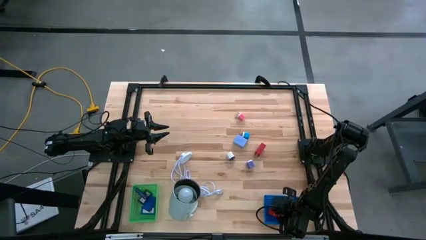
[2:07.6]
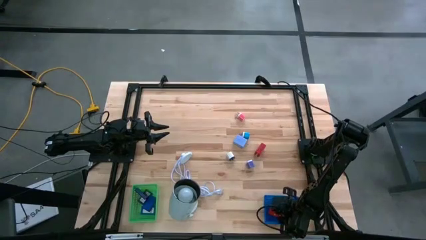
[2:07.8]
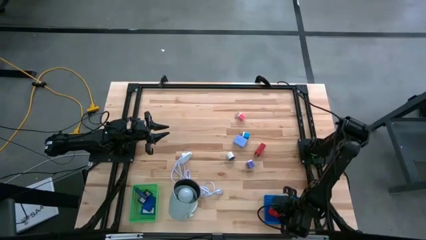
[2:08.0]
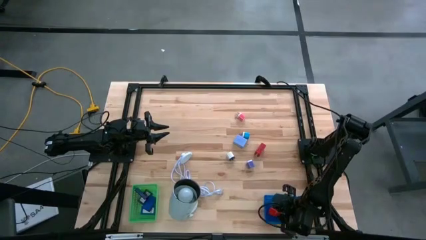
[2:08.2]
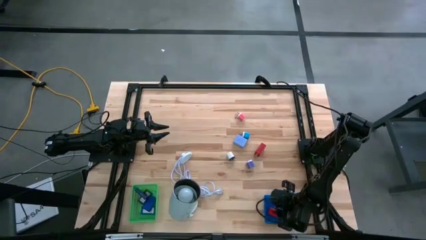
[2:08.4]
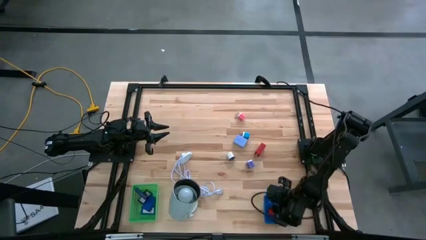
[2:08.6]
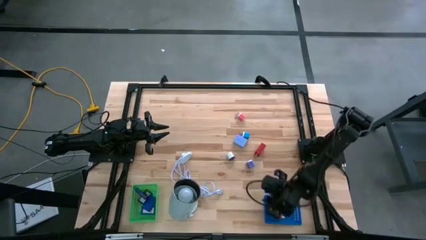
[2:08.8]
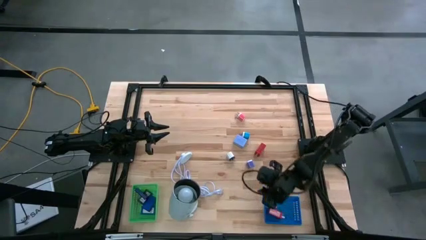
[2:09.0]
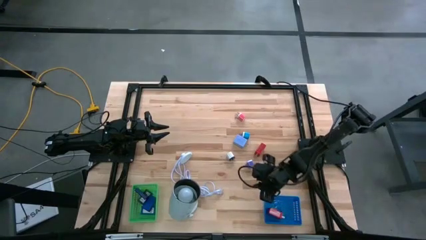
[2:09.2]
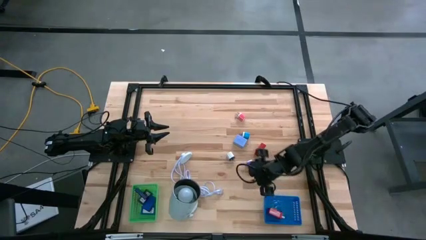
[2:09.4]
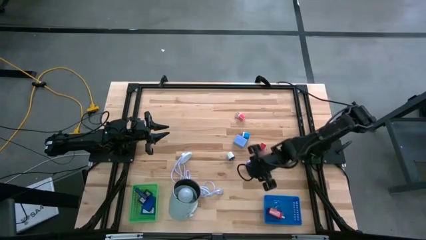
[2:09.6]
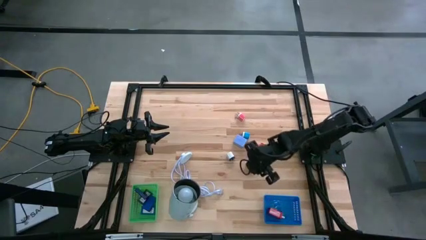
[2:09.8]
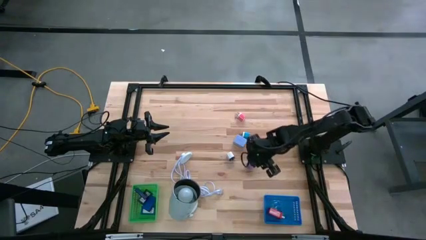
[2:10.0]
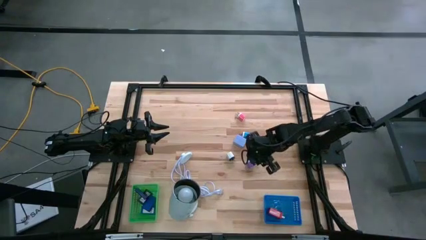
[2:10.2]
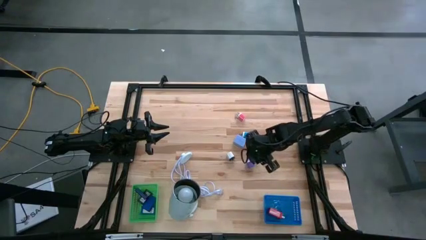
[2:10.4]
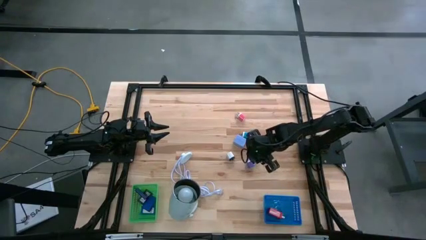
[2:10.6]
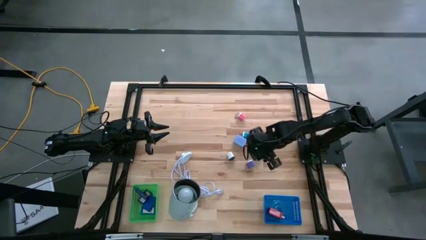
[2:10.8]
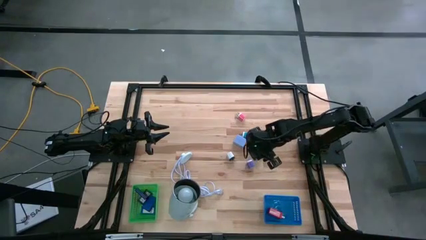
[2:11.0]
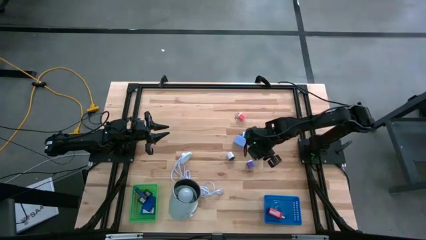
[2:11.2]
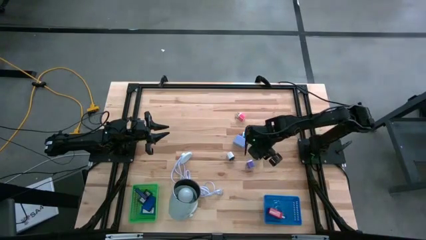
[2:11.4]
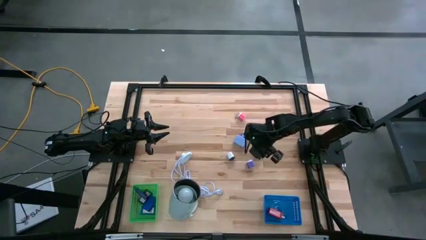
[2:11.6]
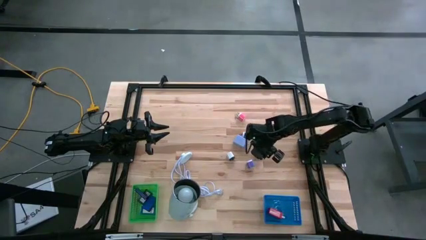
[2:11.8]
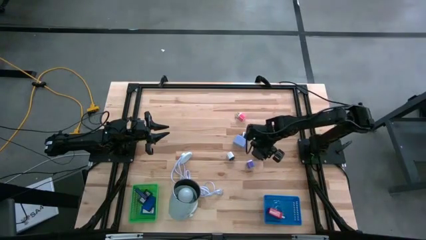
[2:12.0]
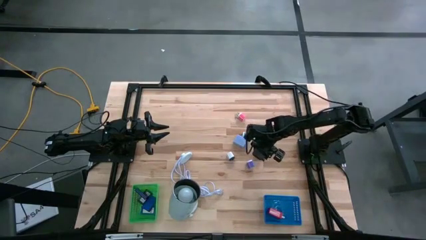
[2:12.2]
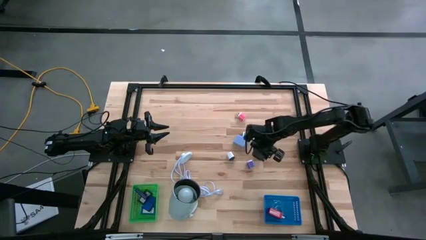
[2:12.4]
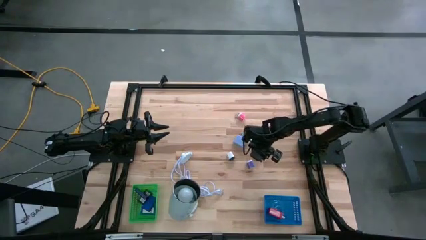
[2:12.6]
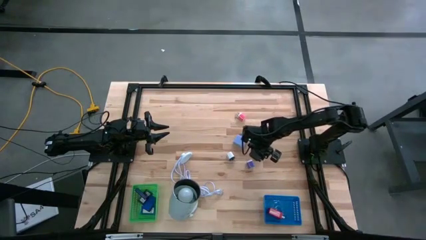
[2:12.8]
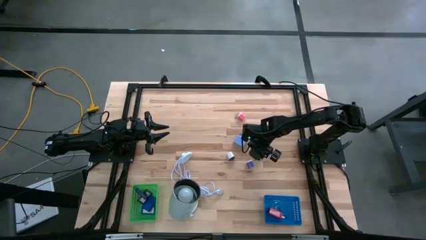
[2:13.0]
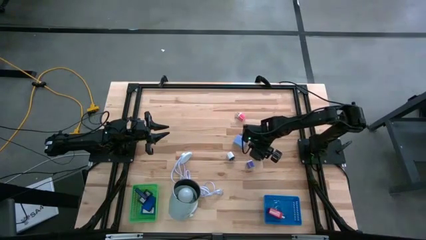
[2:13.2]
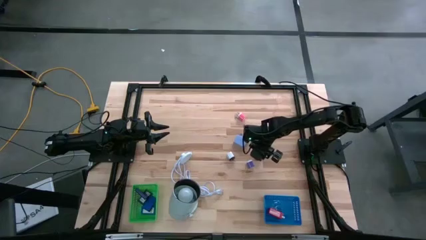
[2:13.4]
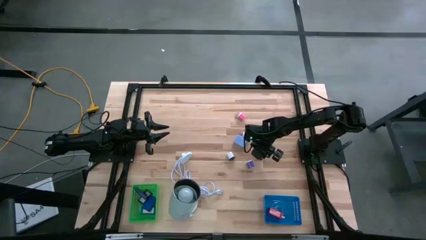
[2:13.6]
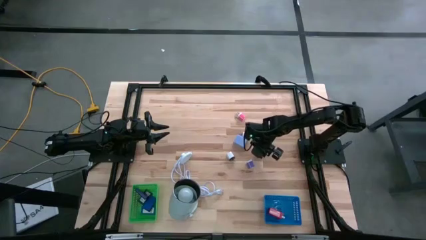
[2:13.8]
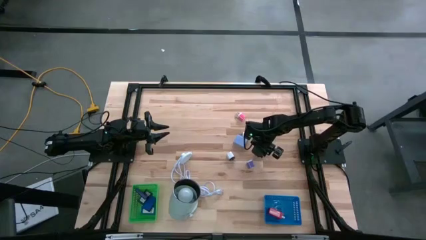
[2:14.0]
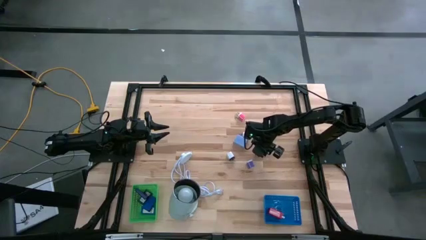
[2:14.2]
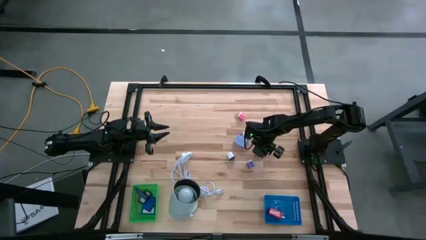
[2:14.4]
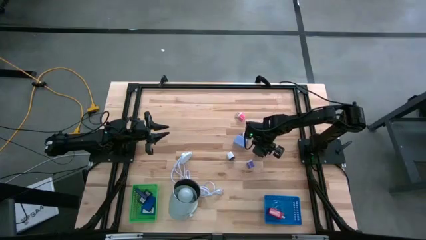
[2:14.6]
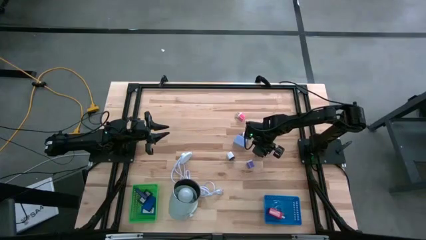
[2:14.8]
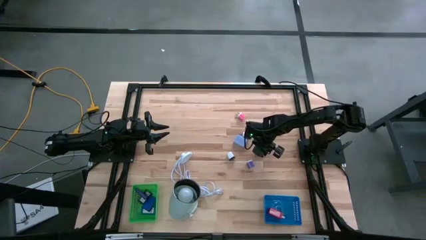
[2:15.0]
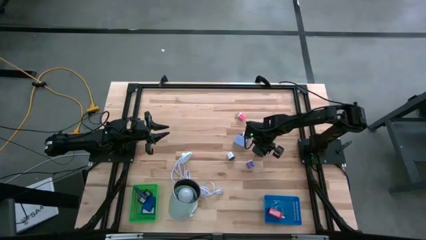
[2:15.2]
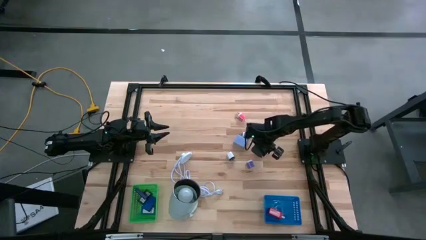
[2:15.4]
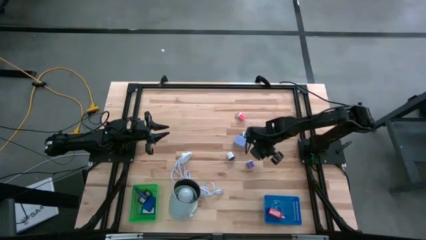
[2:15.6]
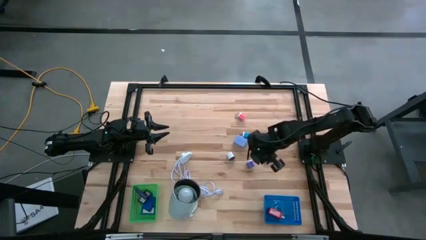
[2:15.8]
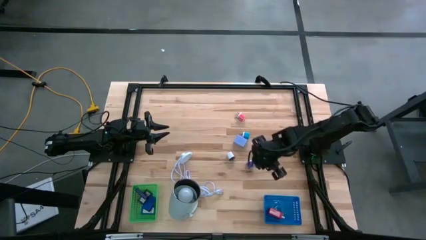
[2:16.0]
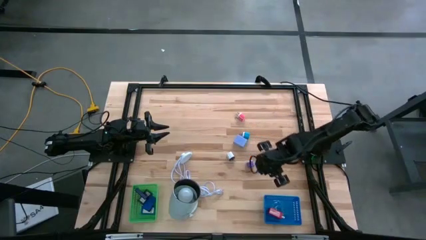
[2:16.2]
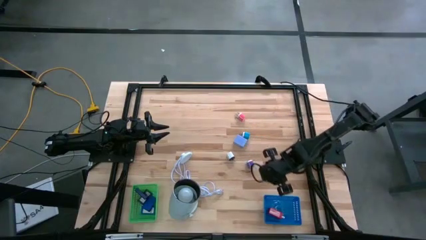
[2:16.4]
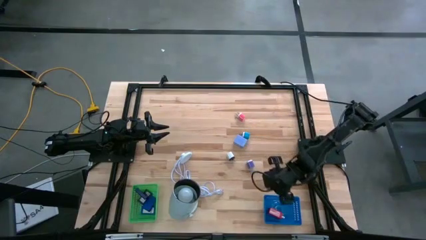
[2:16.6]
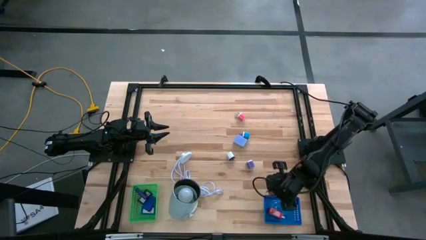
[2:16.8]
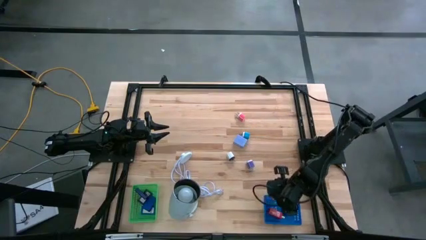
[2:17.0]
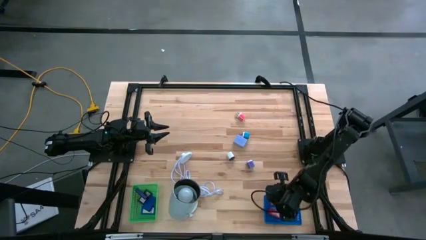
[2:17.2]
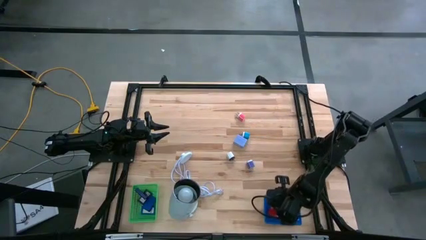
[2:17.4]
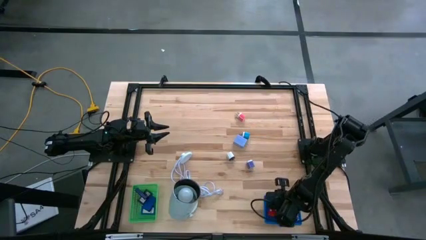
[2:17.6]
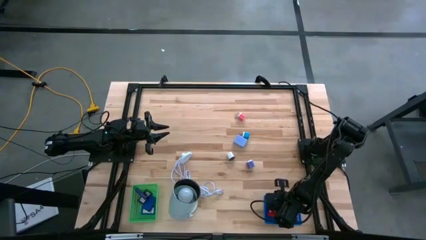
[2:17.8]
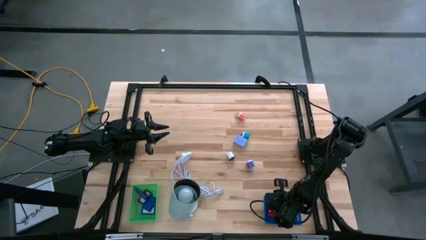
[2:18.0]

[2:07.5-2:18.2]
Task: Pick & Place Office items
Put the red charger adapter into the blue basket

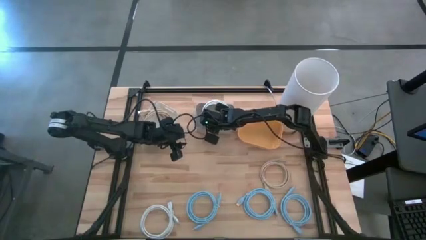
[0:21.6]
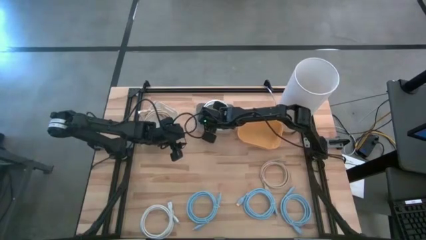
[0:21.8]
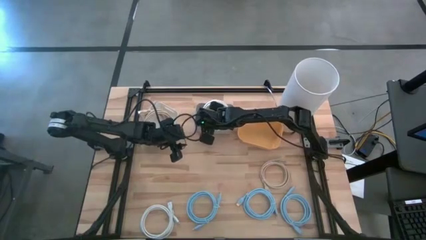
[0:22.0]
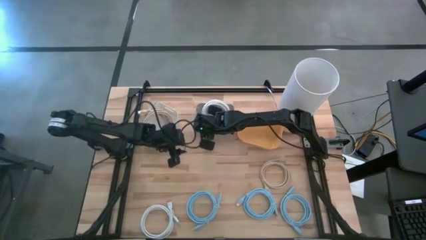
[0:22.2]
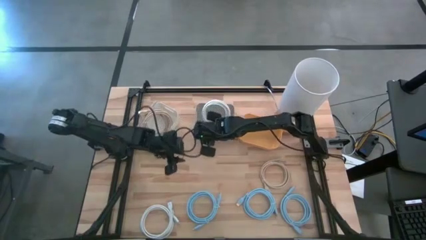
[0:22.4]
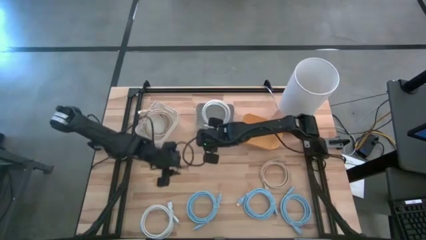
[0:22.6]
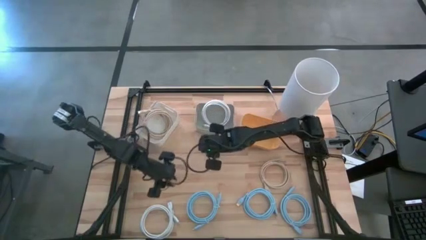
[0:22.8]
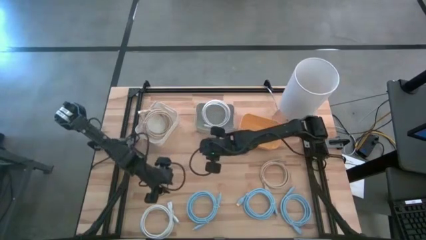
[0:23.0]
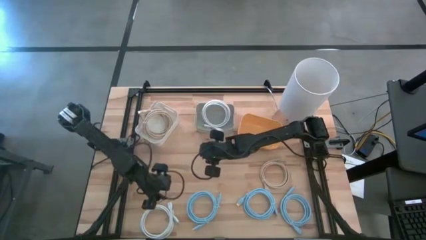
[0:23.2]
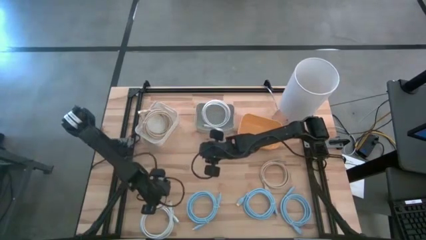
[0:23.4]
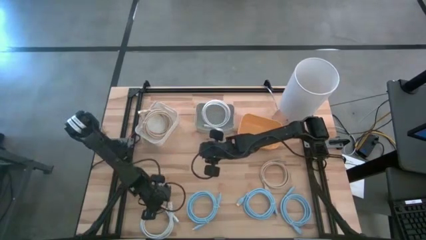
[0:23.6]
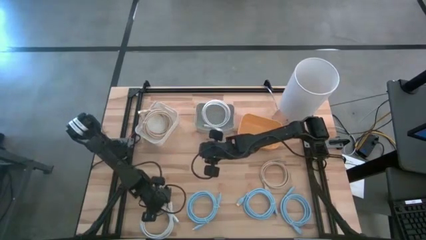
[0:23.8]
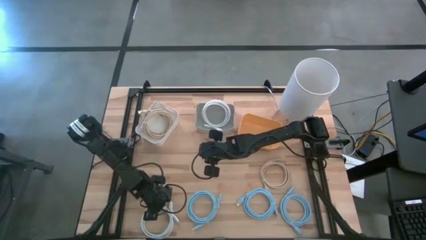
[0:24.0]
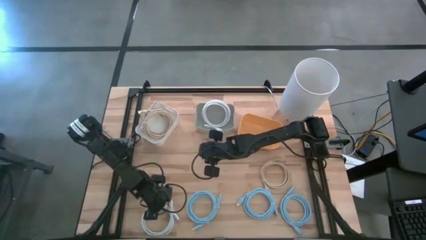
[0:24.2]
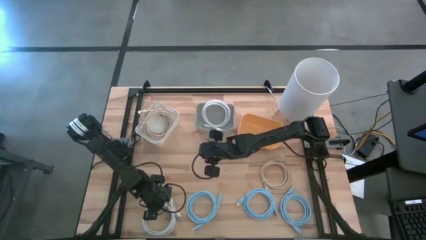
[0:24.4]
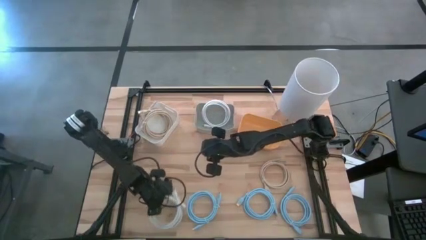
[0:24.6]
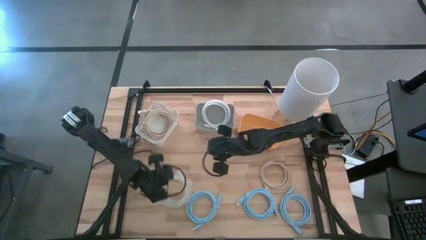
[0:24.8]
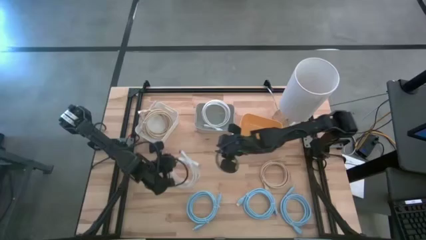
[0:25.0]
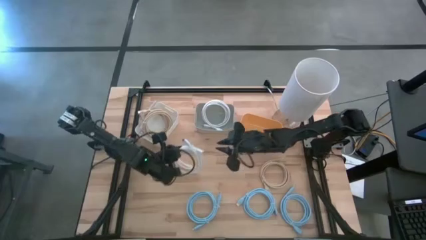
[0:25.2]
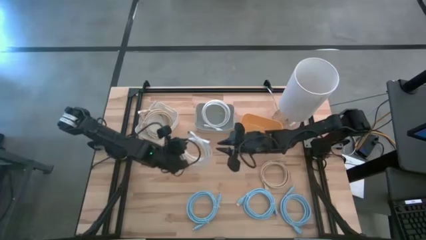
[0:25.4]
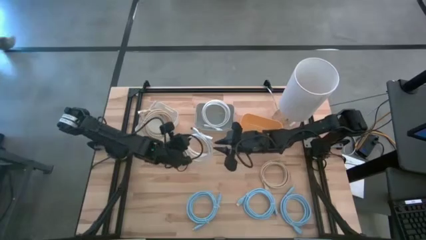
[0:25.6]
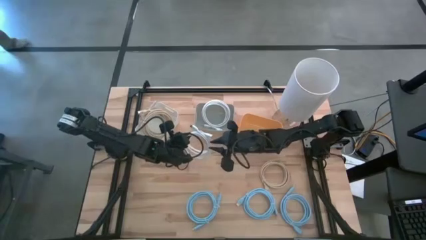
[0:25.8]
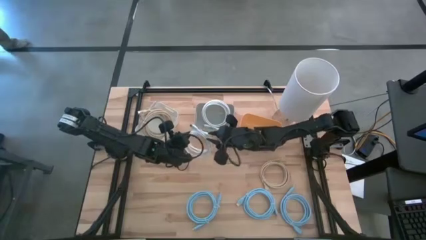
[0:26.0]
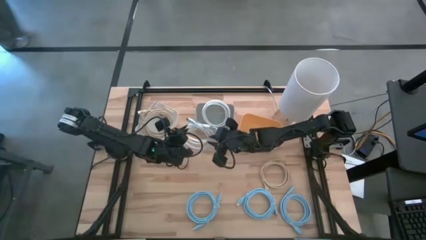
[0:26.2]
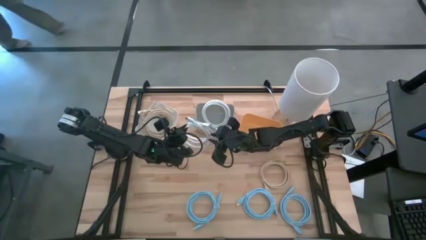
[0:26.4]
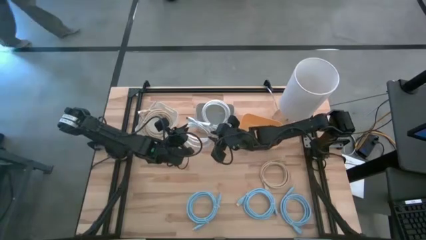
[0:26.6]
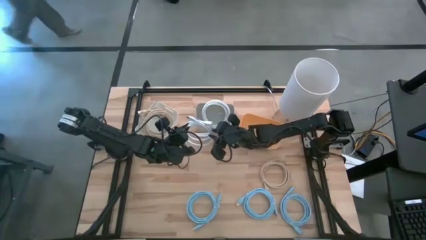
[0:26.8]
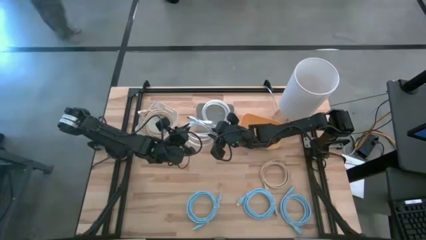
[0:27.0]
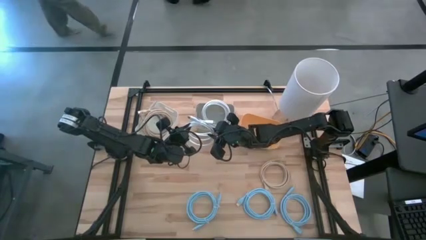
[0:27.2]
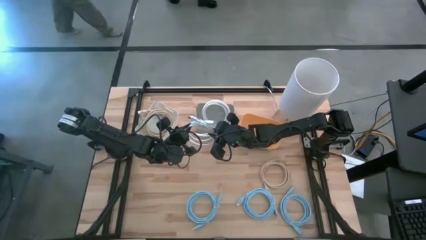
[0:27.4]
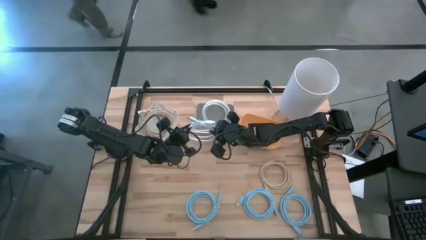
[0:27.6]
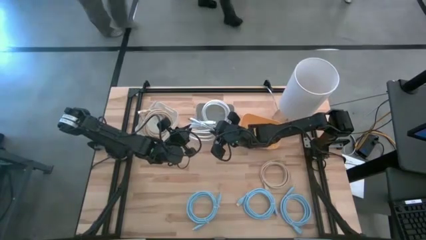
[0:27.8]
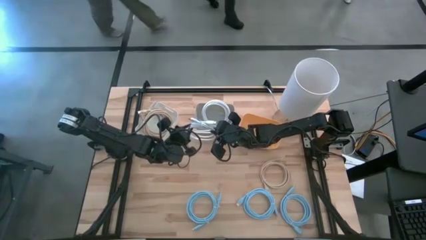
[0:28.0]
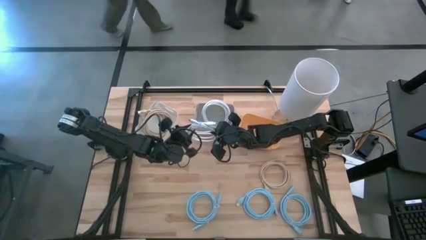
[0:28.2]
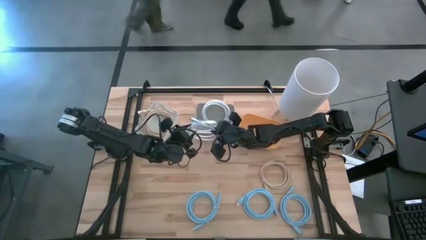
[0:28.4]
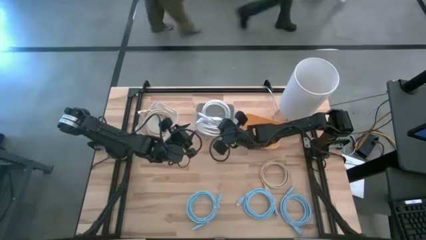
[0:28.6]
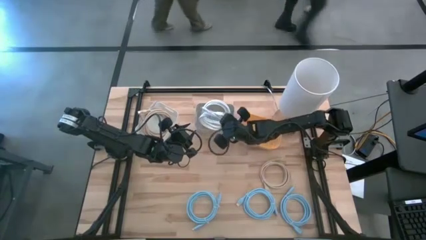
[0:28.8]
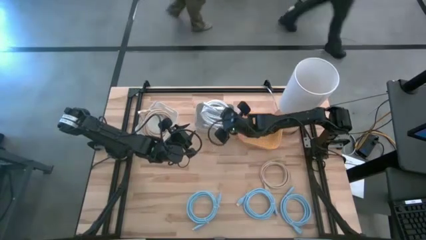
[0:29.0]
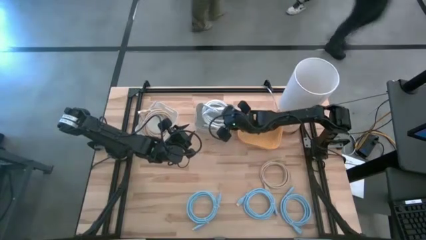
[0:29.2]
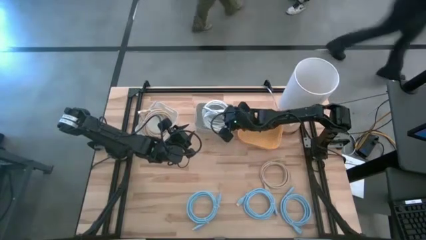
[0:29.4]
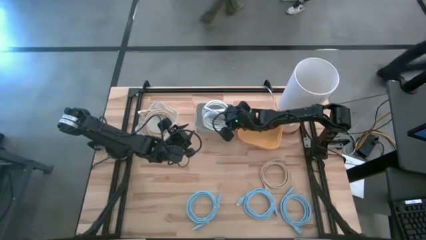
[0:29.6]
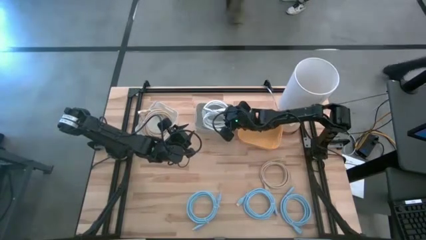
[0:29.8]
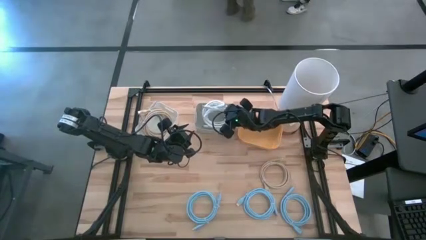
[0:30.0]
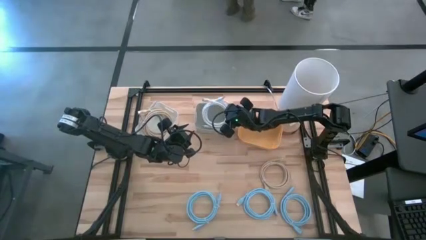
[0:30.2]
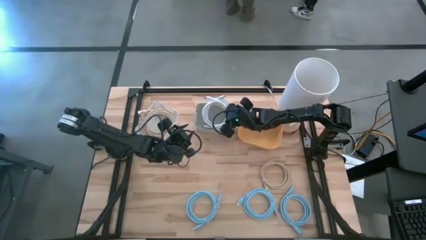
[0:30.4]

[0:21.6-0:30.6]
Task: Sort HDMI cables
Put the white HDMI cable into the gray bin
